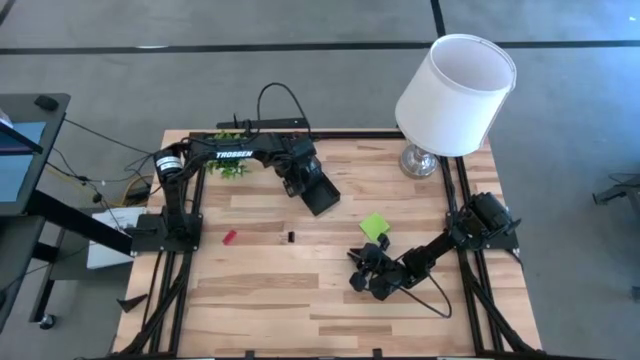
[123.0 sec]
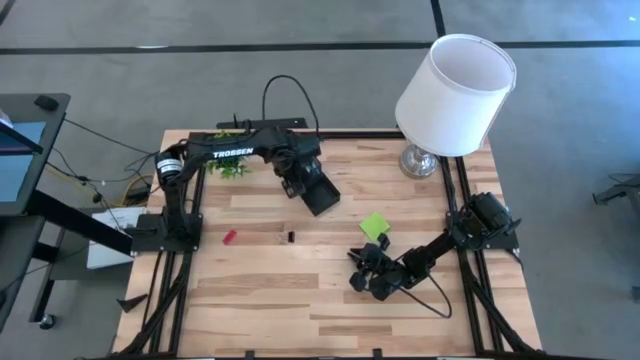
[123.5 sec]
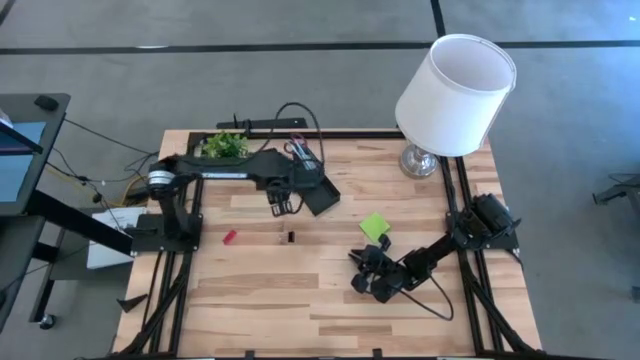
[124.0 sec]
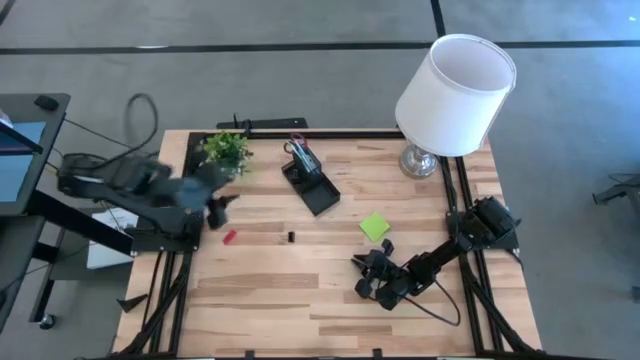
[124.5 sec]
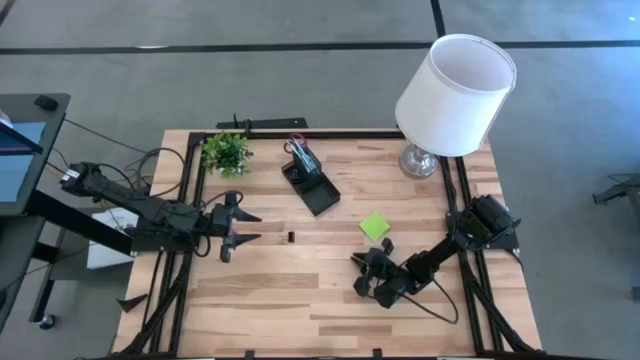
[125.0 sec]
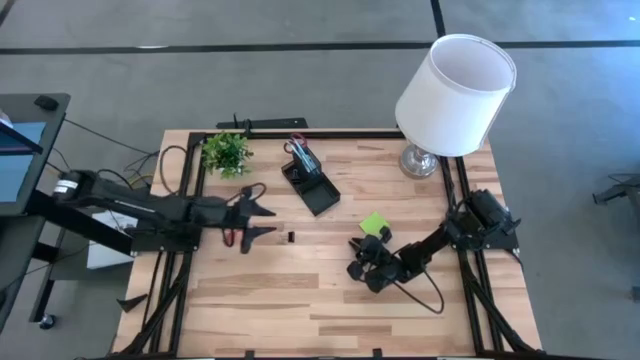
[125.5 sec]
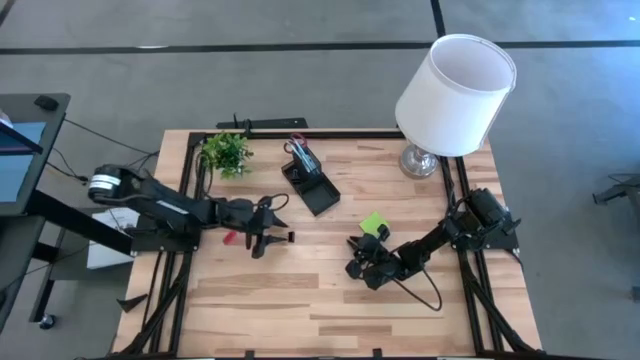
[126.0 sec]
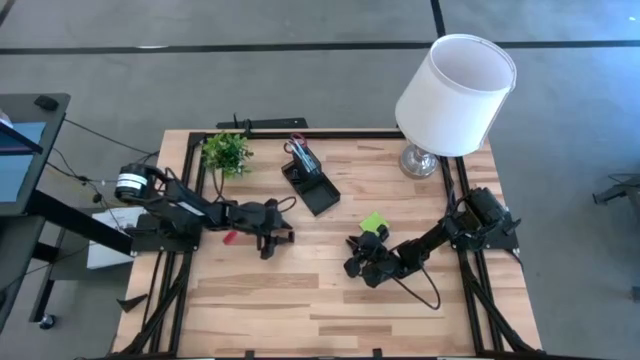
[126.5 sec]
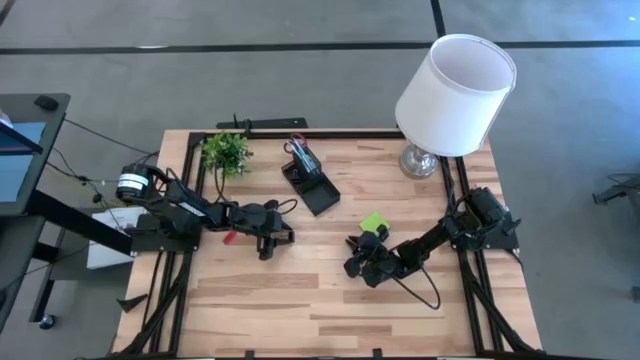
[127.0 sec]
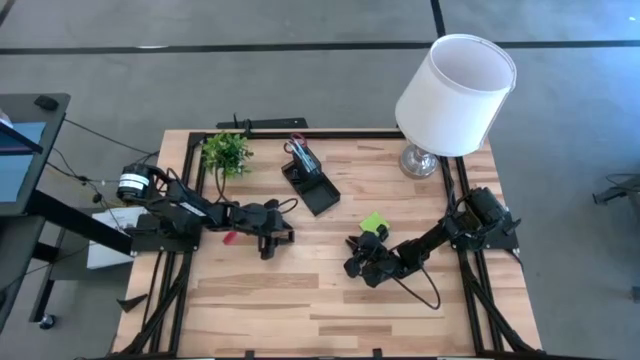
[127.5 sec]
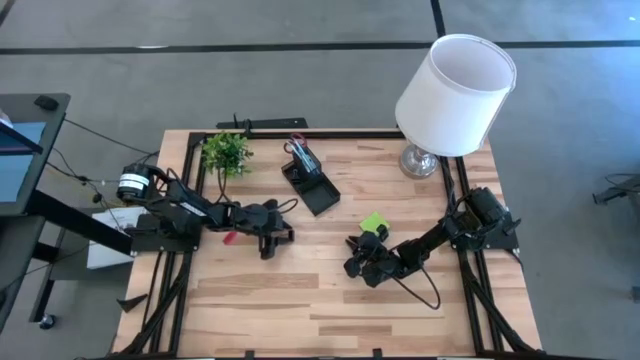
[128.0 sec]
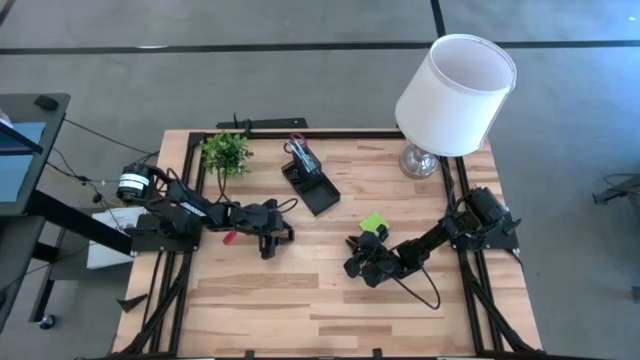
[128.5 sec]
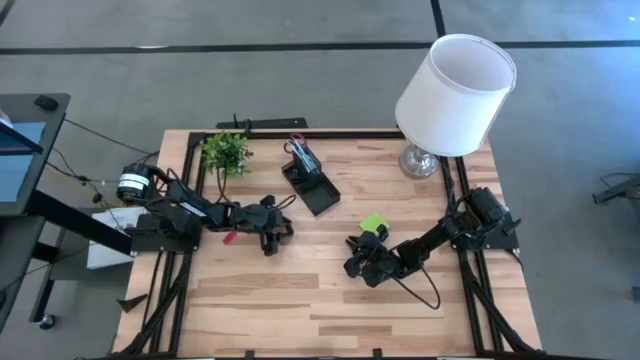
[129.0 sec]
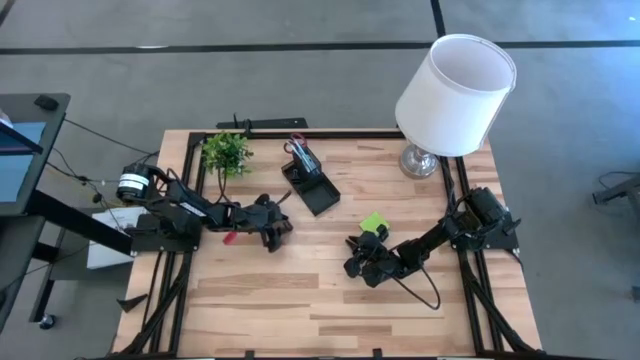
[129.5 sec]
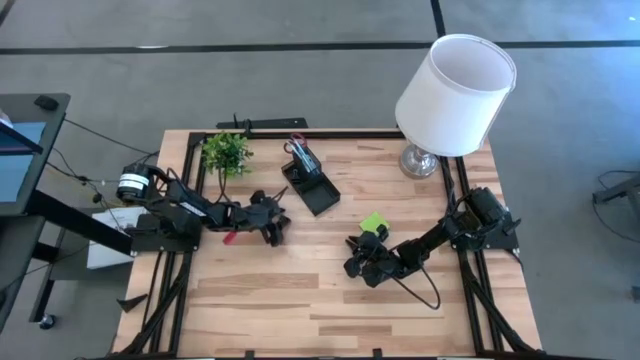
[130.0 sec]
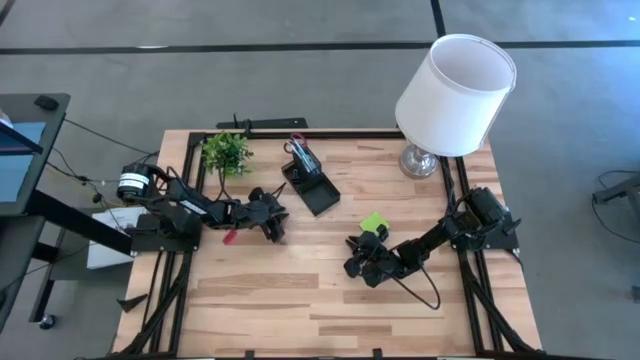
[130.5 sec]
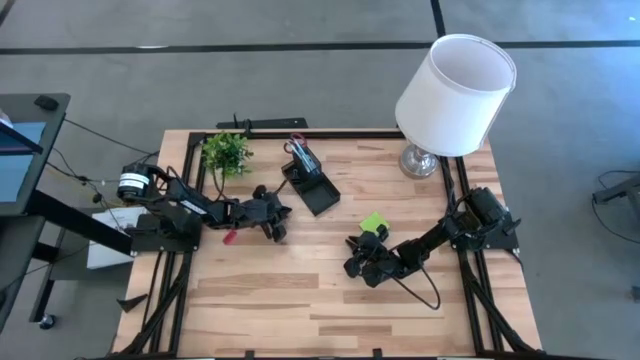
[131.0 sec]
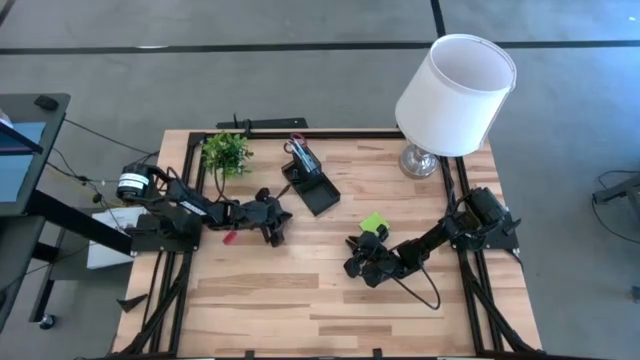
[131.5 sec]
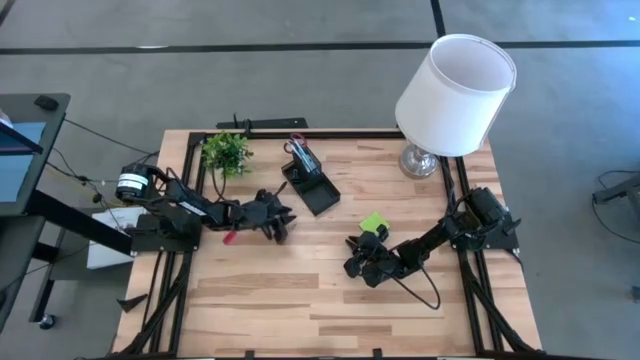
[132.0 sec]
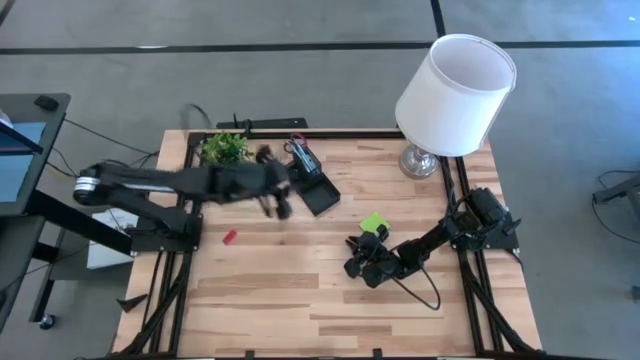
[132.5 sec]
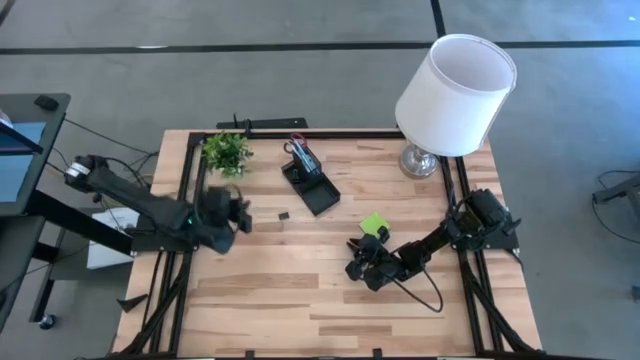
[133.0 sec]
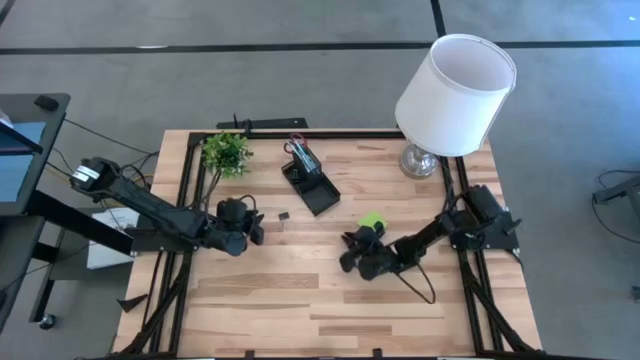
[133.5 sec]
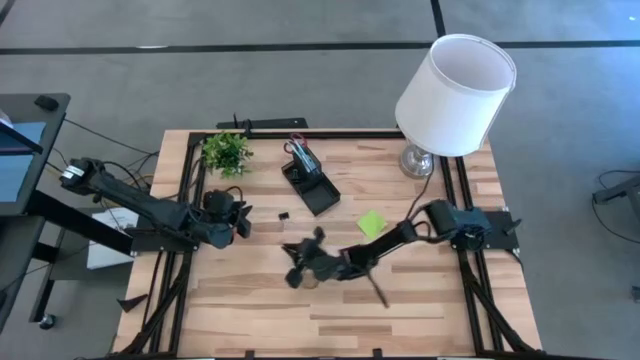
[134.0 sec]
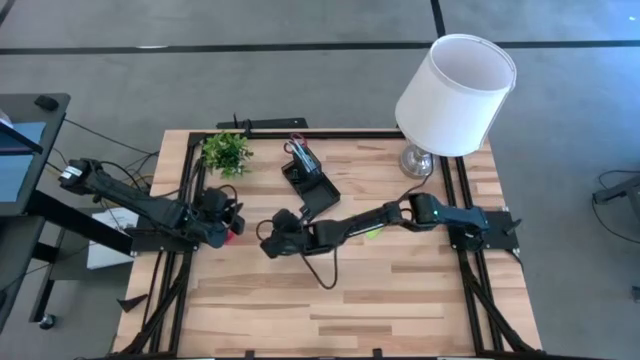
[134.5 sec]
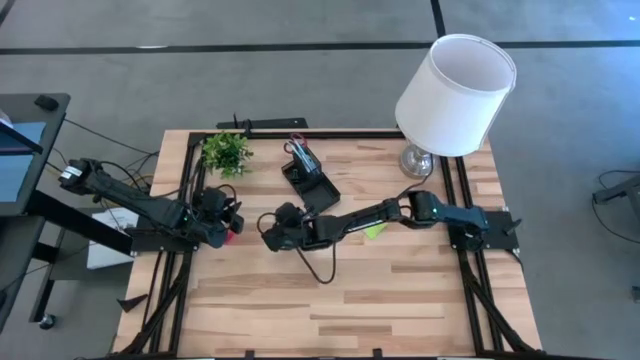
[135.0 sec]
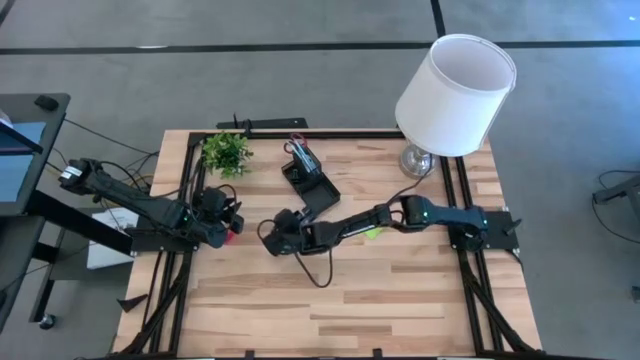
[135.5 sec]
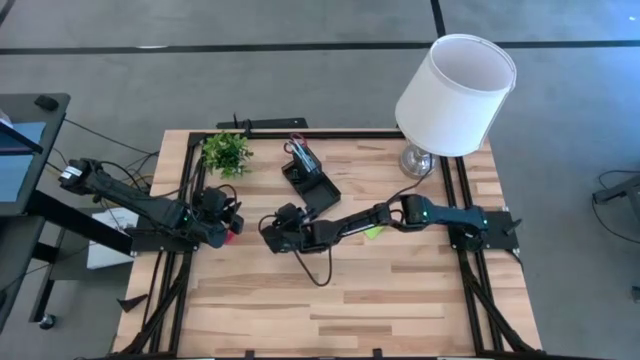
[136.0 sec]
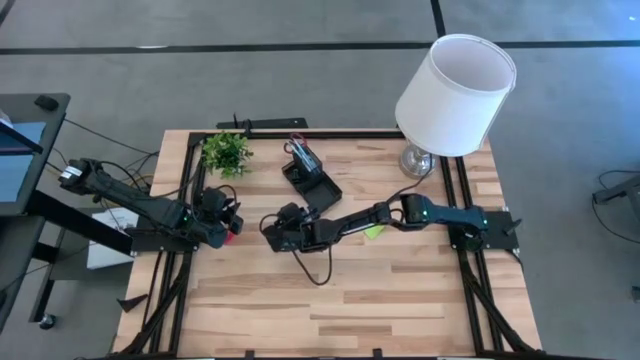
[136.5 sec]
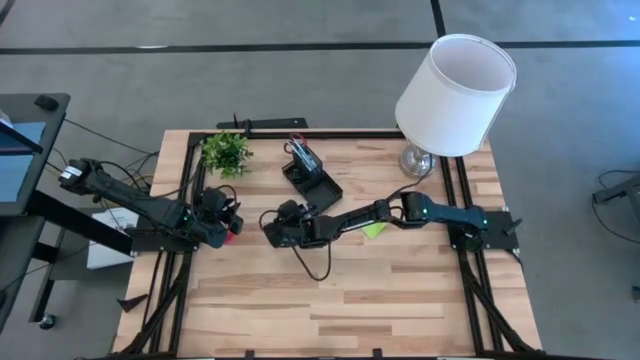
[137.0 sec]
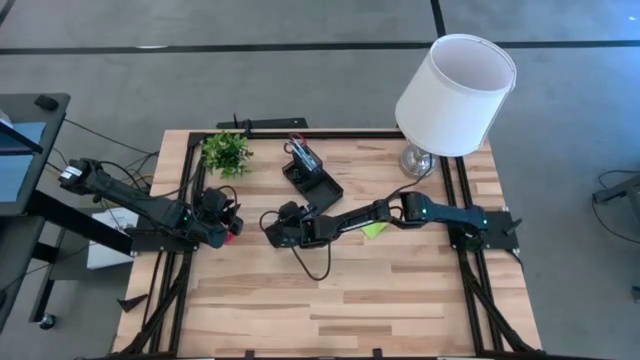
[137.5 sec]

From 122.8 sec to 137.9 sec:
Task: Pick and place office supplies into organizer
Put the black binder clip into the desk organizer

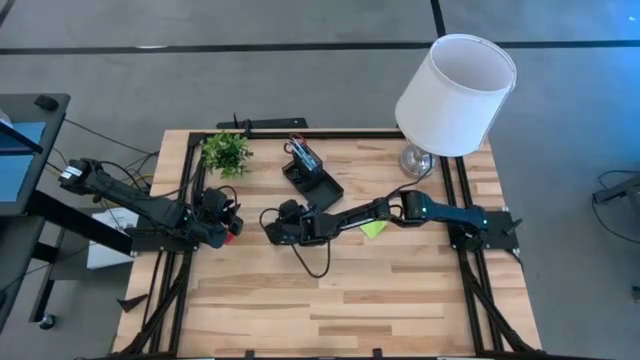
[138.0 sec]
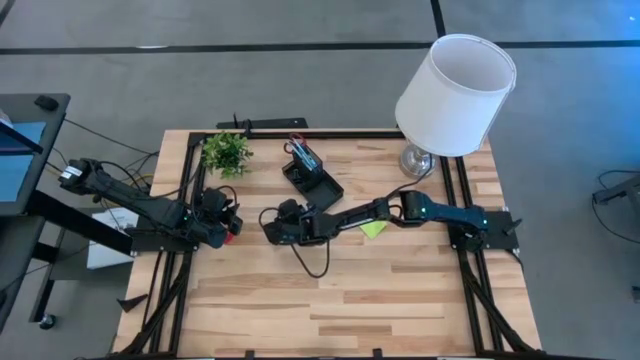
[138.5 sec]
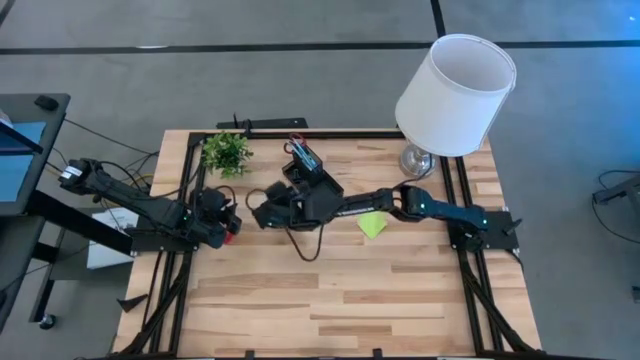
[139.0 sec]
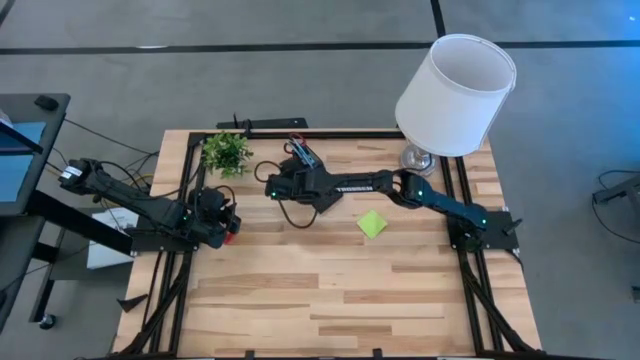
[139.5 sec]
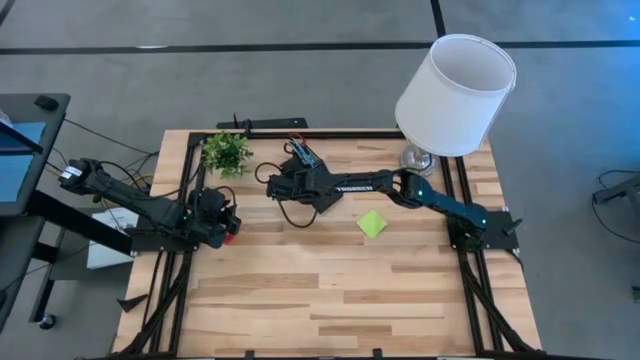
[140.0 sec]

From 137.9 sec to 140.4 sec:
Put the black binder clip into the desk organizer

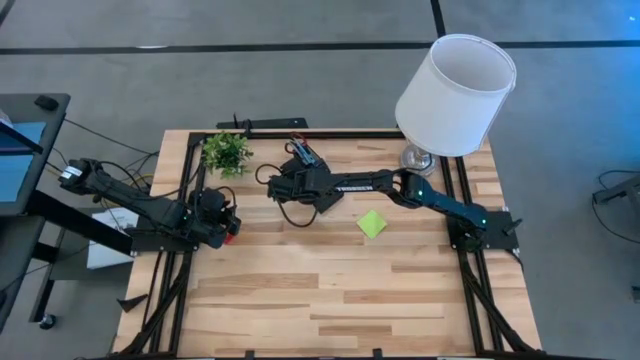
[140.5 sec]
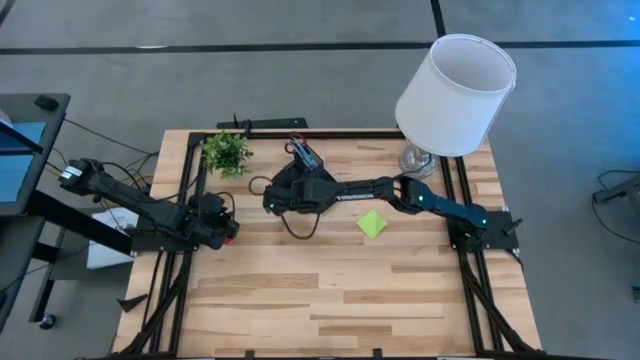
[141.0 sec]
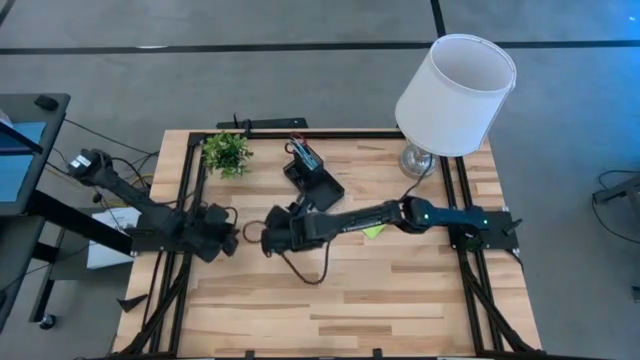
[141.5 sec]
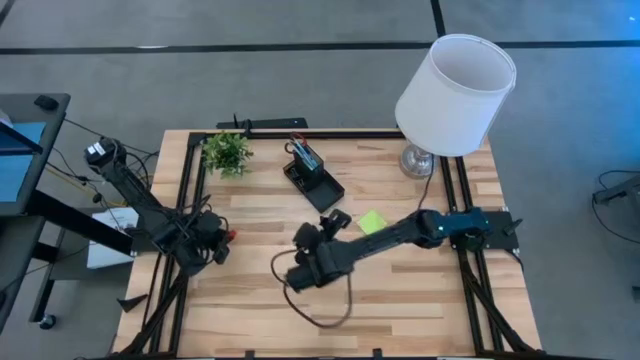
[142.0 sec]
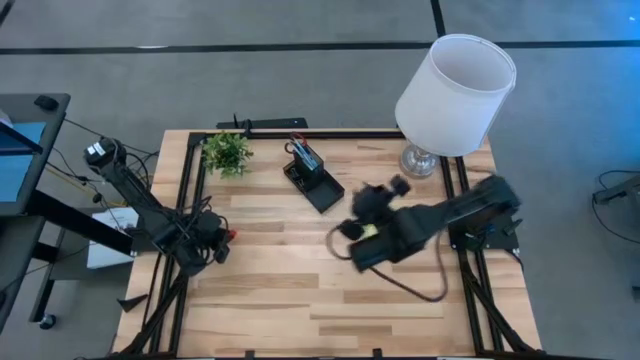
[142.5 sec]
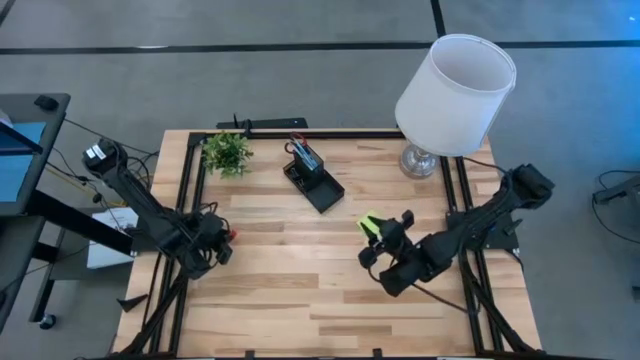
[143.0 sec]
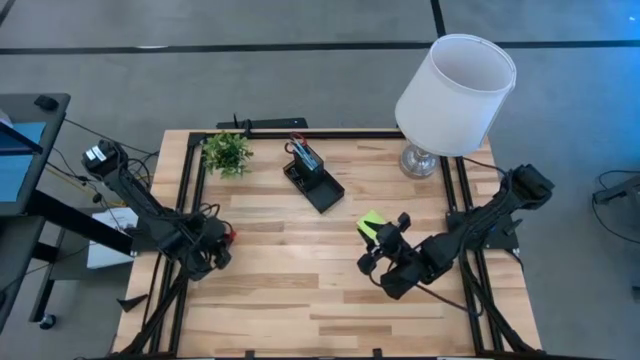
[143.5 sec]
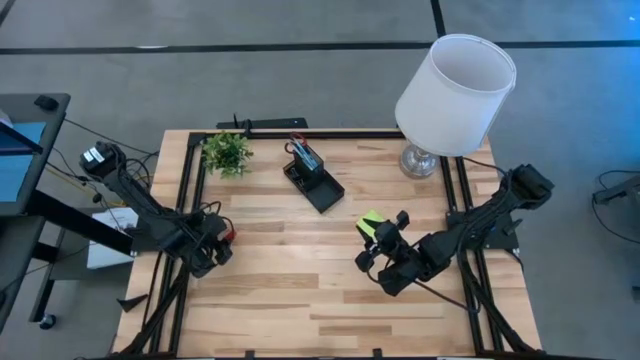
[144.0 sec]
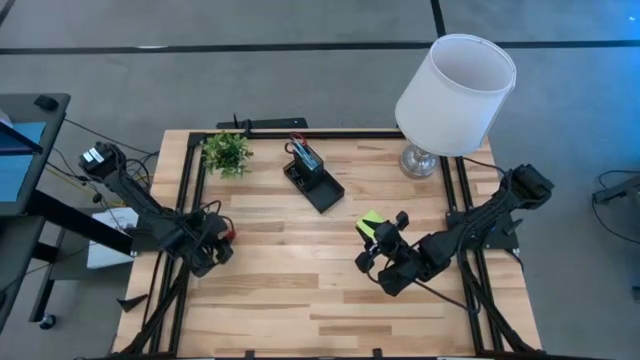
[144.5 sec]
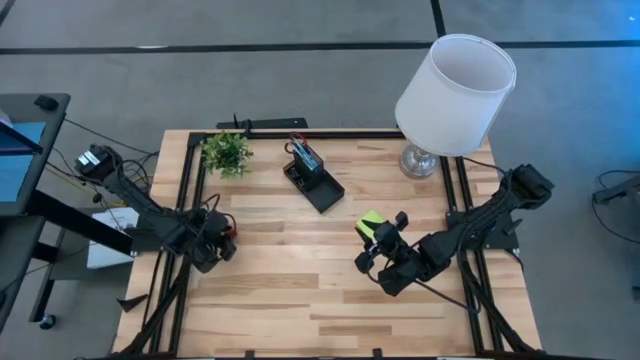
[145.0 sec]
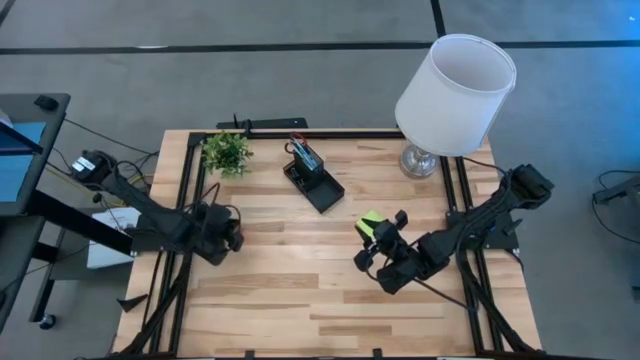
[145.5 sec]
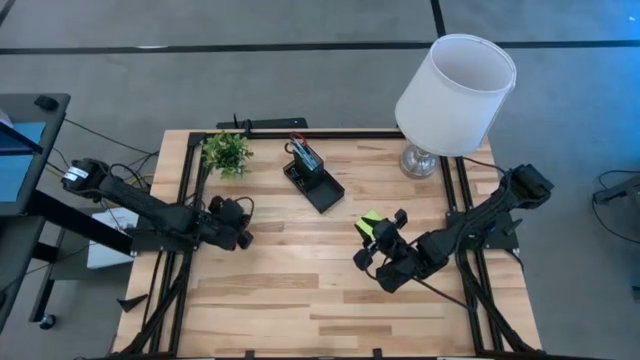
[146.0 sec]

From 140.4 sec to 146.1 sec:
Put the orange eraser into the desk organizer
